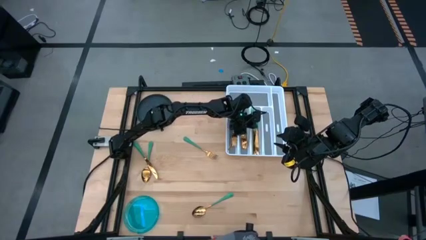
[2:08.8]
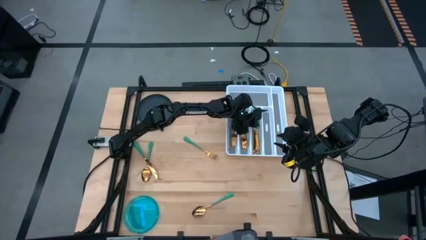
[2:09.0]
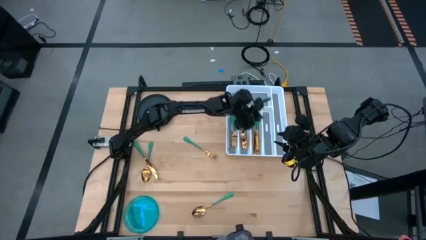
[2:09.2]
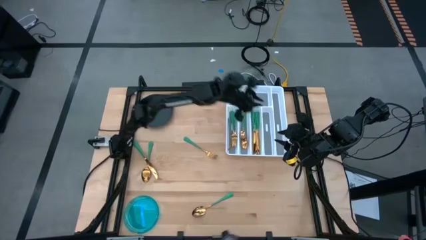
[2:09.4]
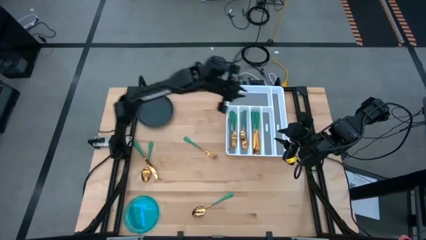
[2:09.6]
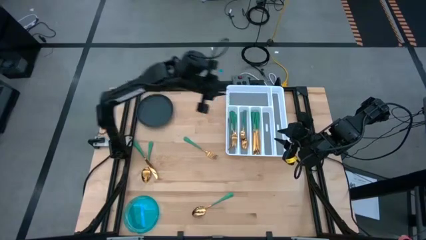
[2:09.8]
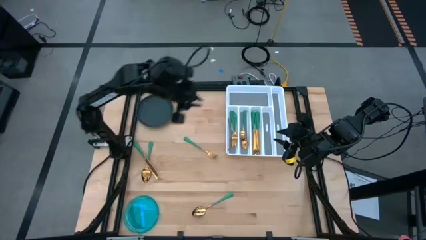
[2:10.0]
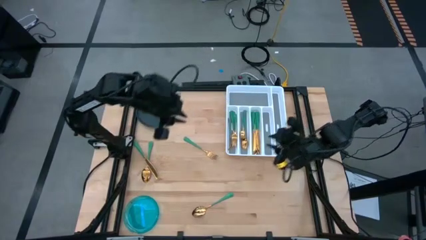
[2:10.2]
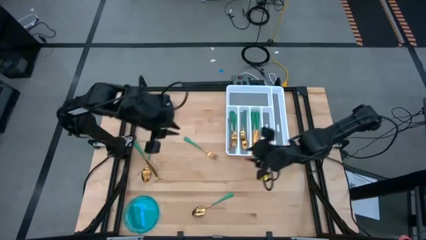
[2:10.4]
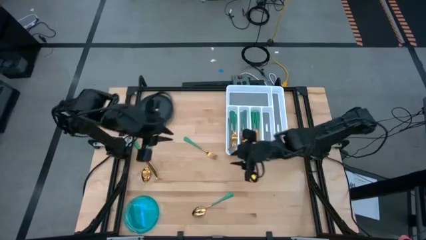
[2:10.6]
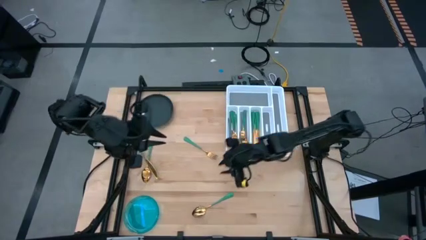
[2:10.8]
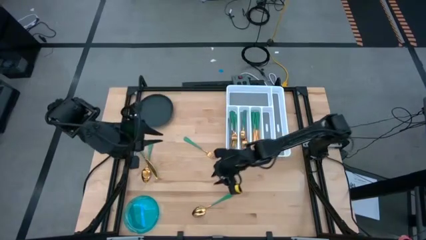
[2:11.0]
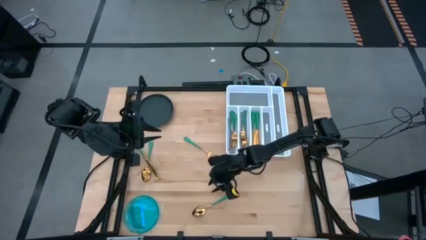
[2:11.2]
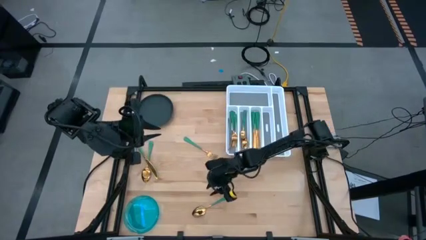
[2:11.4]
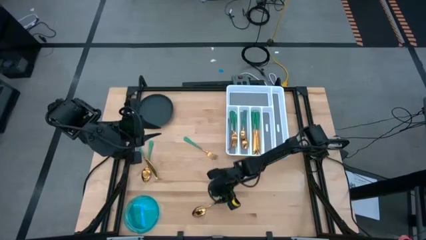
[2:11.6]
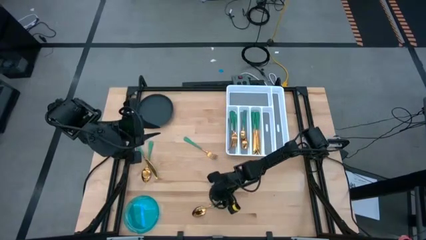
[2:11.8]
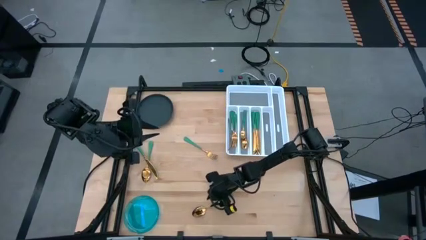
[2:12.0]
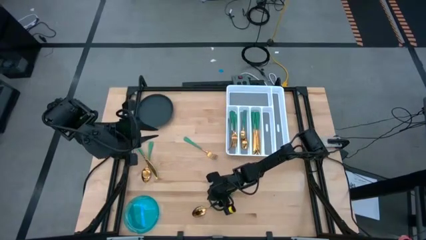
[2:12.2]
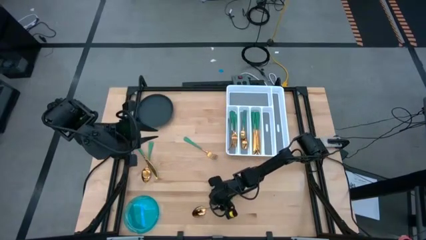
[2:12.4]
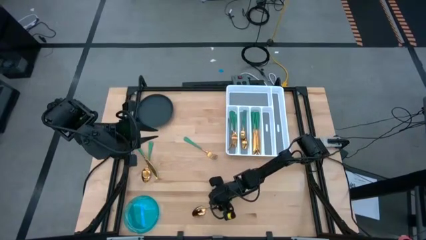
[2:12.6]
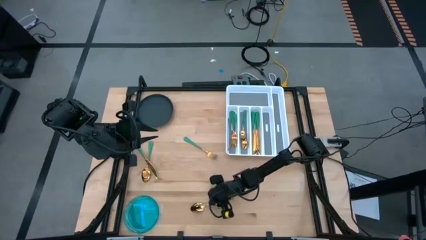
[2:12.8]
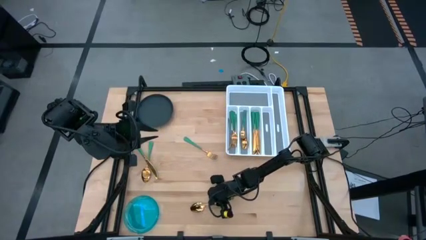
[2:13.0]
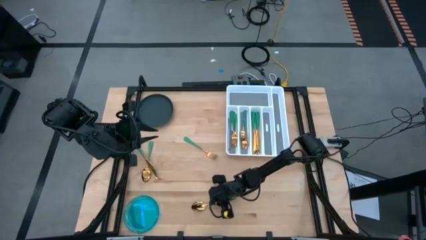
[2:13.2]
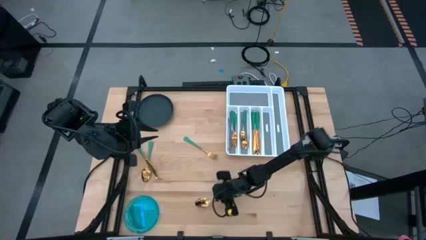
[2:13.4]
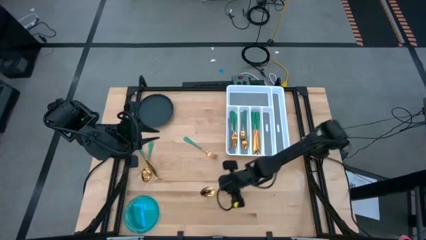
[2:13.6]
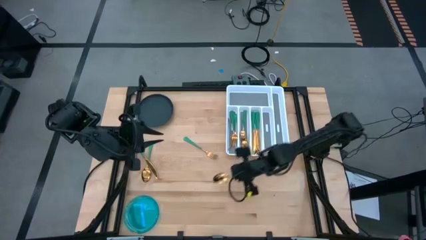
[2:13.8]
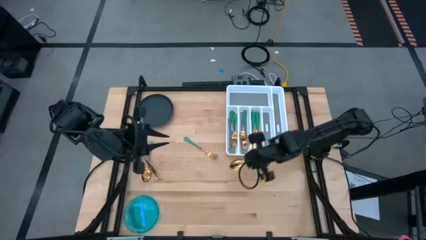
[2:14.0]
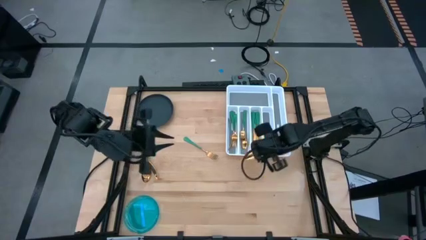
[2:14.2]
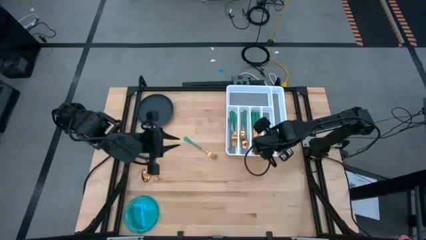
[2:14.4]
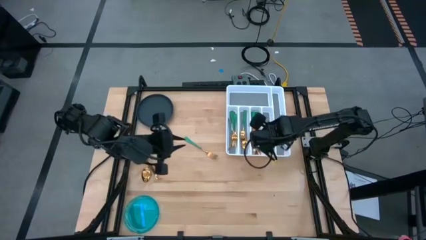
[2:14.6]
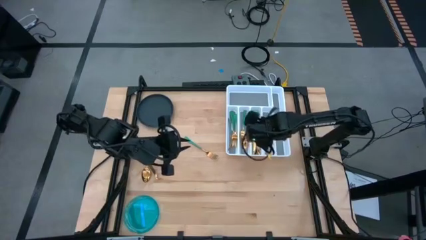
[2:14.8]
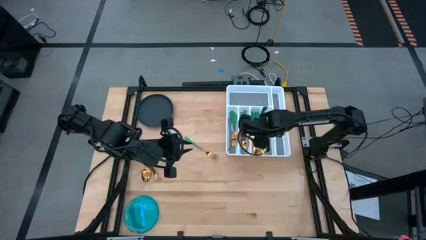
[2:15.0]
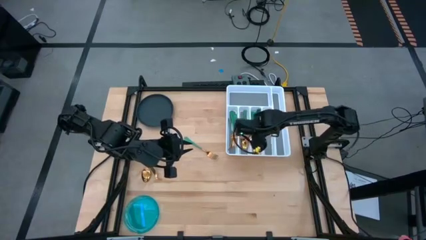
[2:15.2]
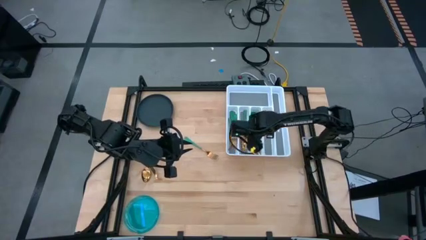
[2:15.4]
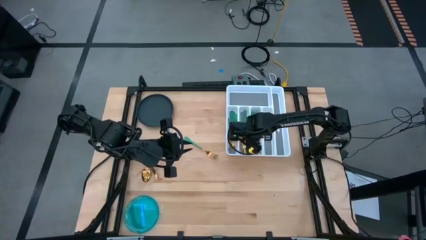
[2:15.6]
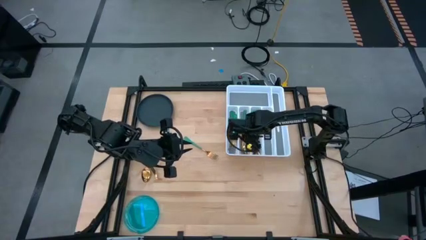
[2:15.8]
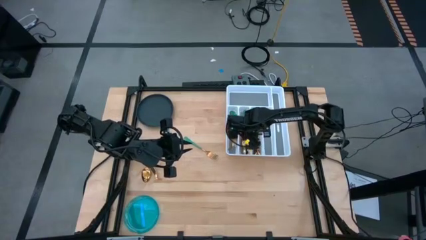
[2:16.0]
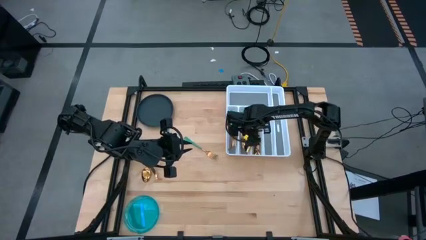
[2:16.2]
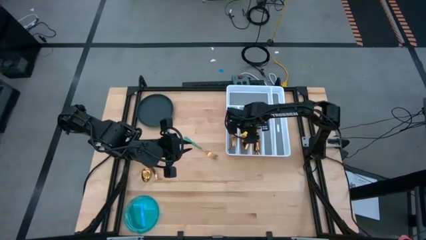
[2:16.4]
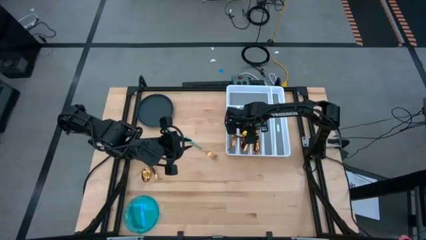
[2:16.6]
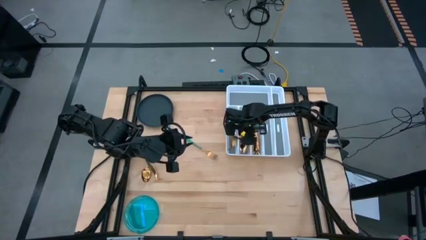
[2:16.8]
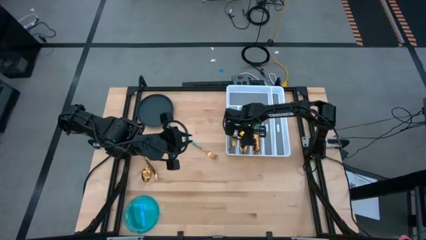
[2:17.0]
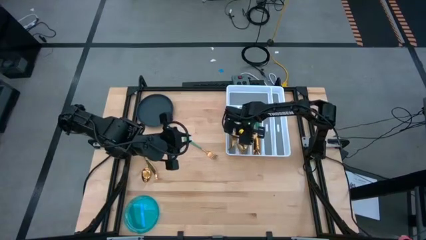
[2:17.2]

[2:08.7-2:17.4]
Task: Sort silverware
Put the green spoon into the white silverware organizer

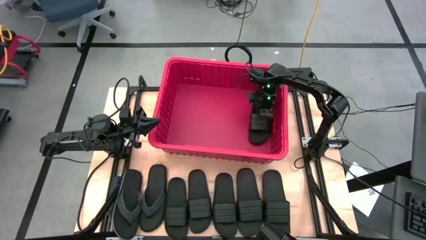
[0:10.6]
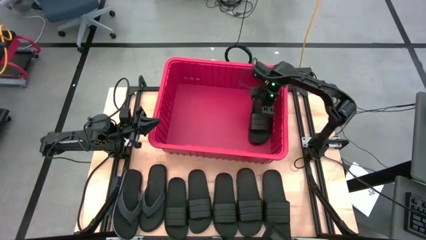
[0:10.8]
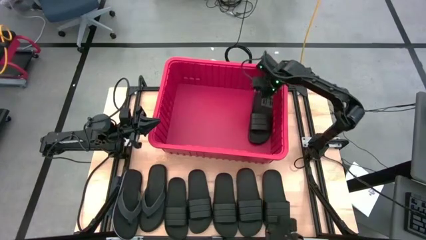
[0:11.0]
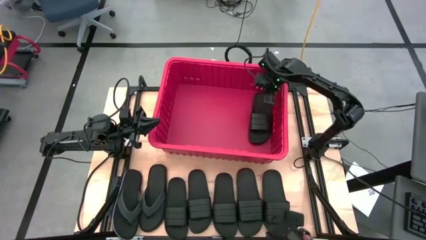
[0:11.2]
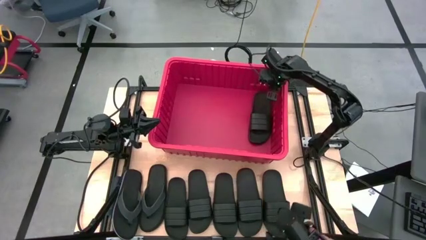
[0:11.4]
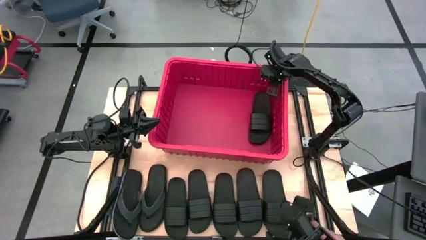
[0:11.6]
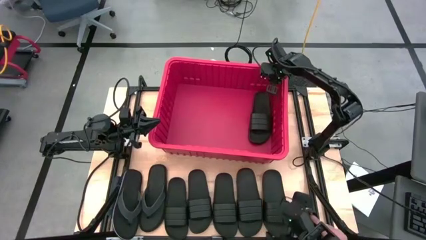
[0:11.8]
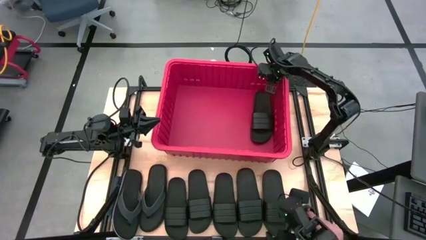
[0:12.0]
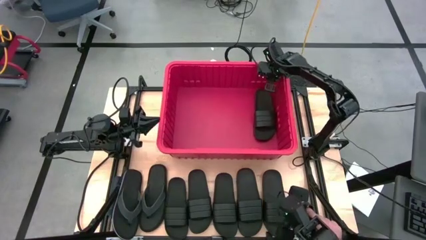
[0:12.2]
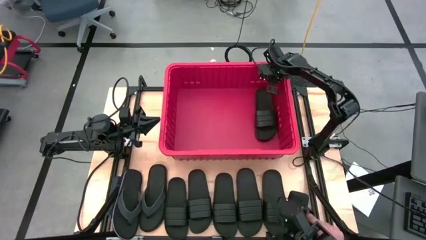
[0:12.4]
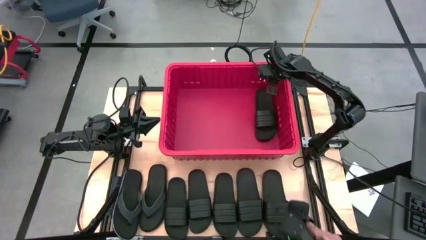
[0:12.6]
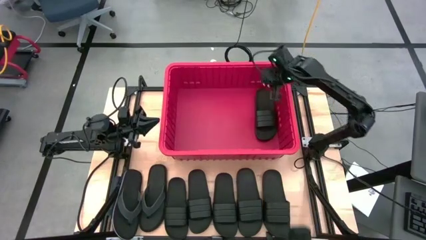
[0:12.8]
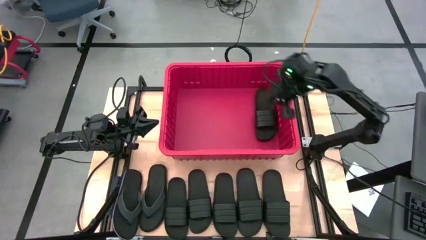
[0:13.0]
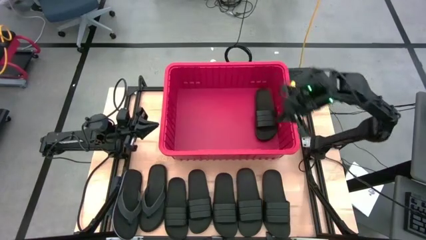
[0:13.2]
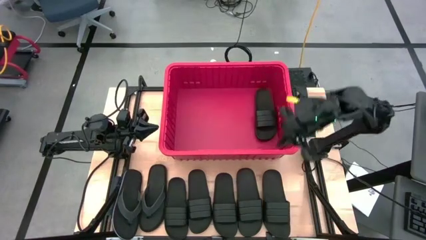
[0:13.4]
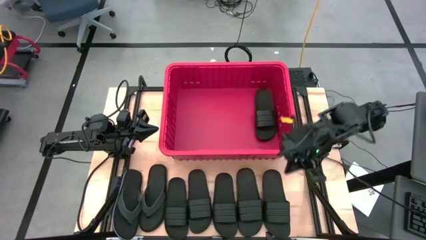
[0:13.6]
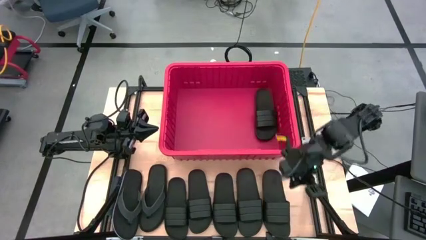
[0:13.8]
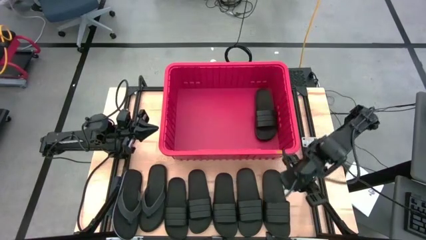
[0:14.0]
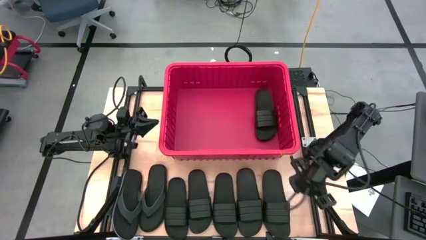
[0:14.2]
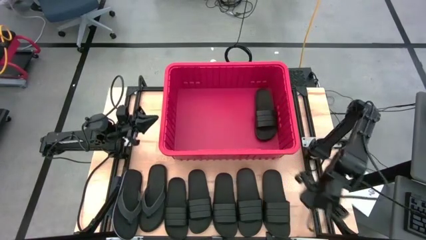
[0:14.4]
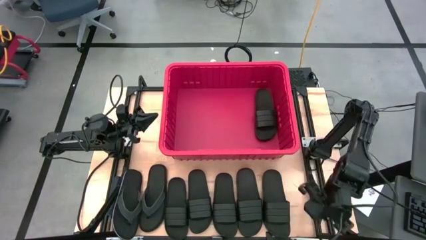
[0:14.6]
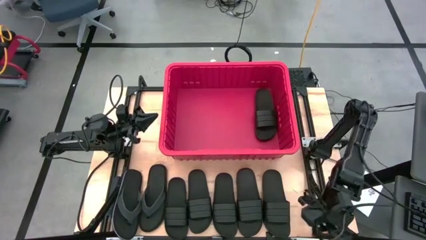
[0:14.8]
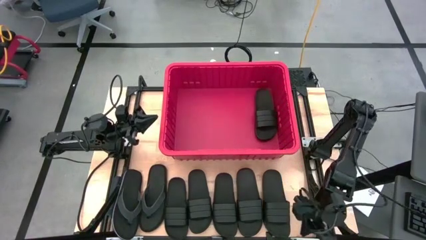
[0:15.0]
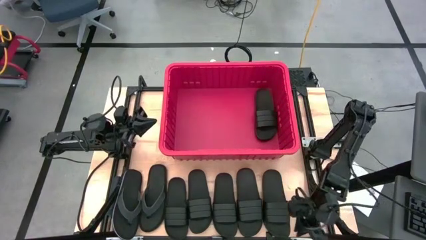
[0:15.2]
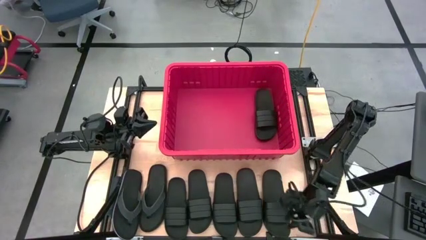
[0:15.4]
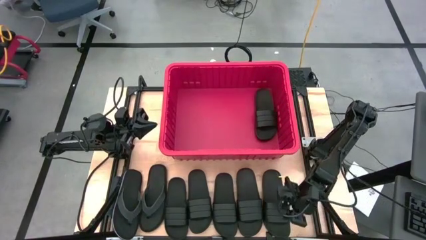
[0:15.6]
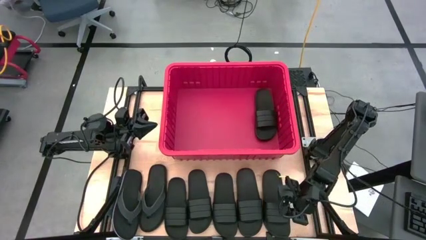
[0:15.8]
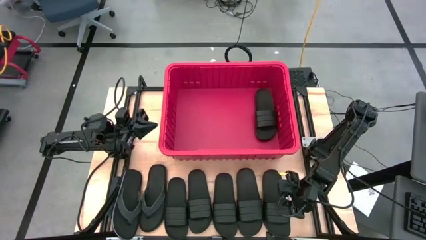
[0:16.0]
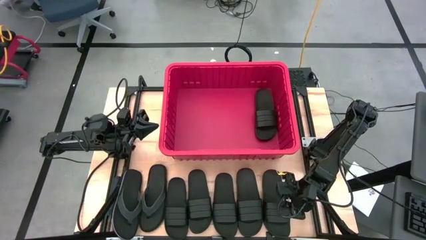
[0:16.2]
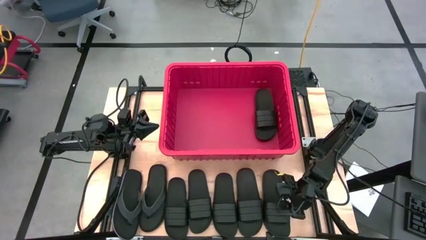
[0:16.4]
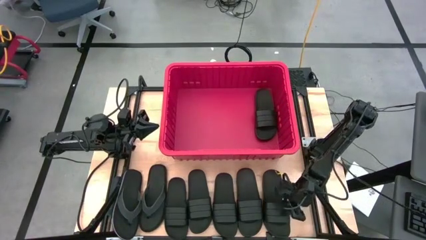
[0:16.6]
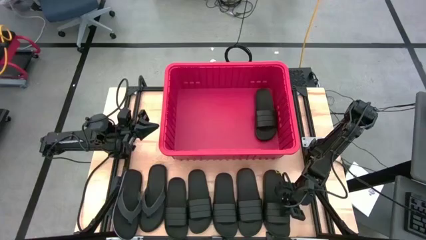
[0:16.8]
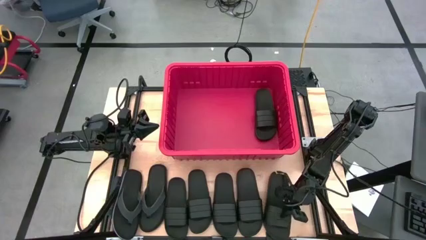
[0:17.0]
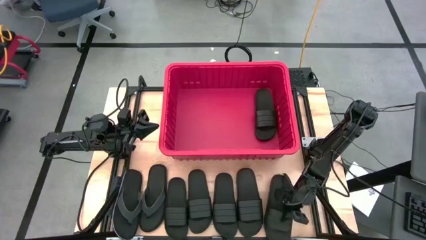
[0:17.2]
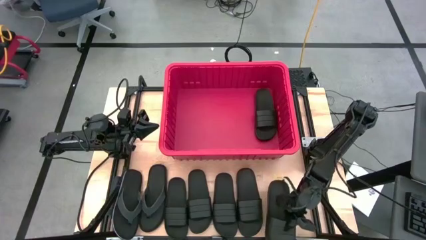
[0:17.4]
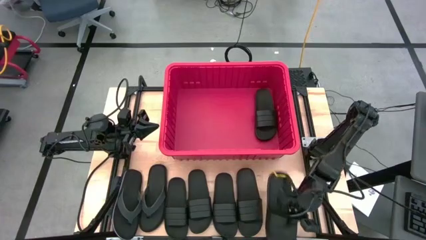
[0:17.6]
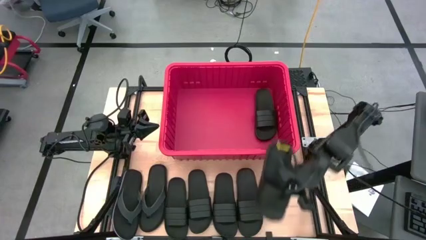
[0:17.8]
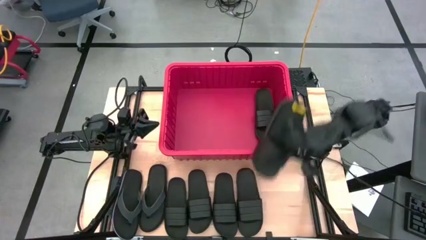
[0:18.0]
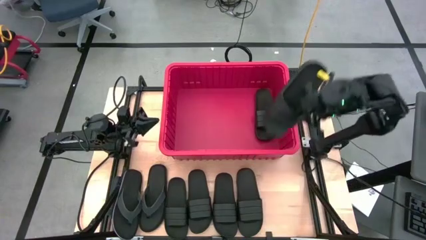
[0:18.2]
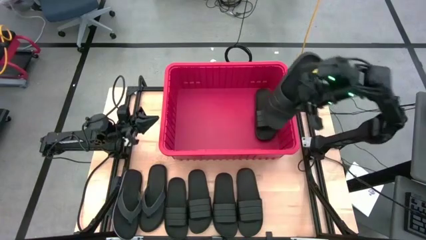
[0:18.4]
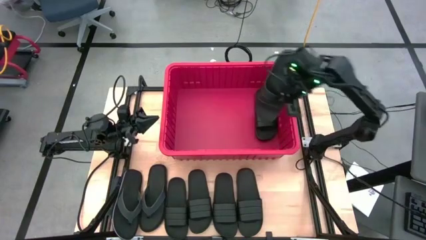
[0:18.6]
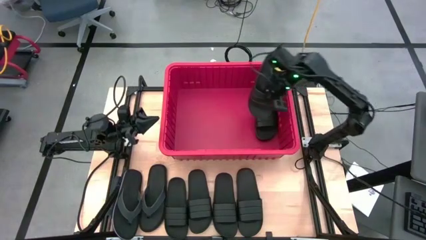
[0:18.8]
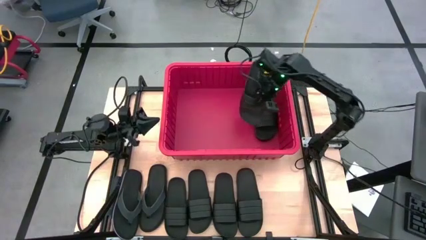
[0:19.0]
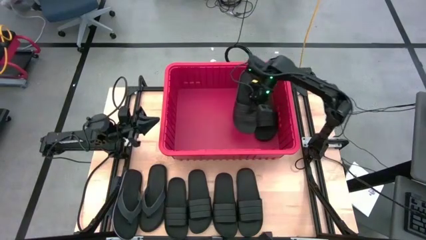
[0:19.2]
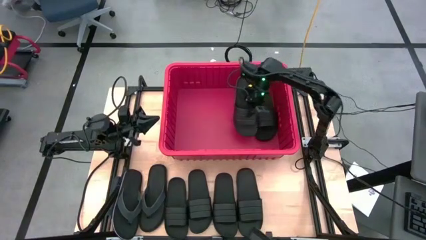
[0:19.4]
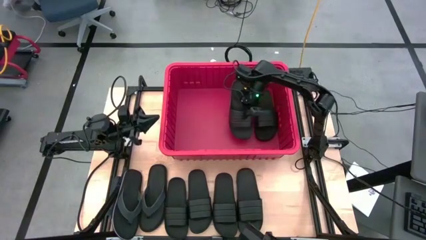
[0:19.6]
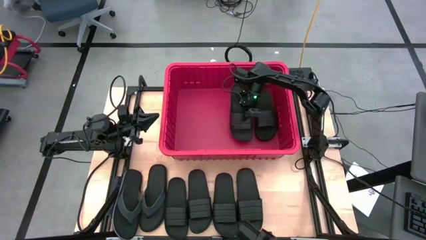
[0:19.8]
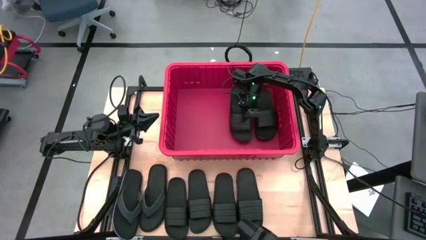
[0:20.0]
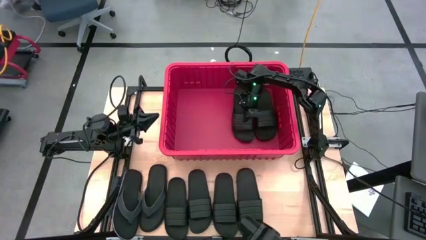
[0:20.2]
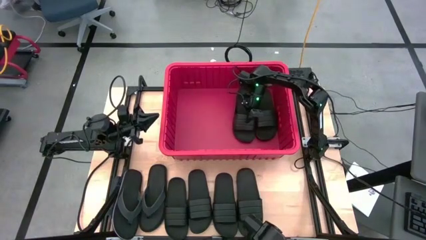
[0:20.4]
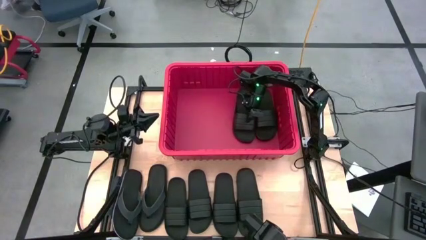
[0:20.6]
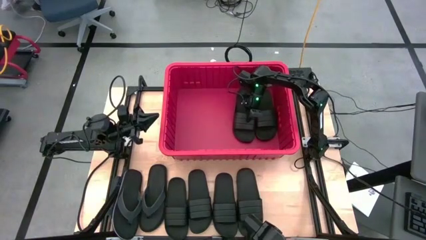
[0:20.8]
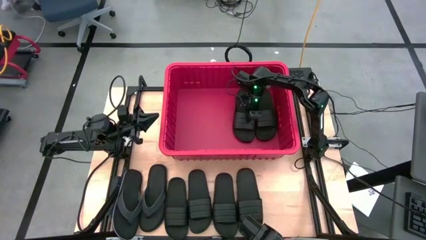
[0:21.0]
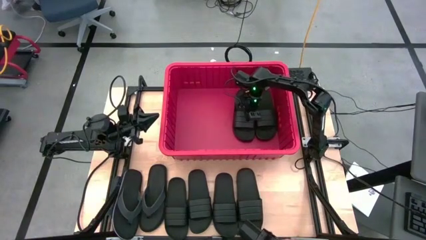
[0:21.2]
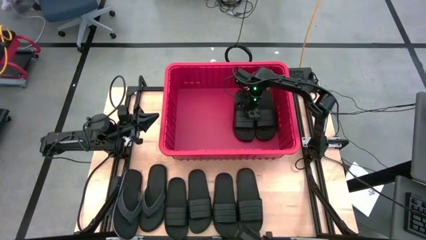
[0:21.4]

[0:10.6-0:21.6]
Task: Pick and place slides into bin
Put the black slide into the red bin
